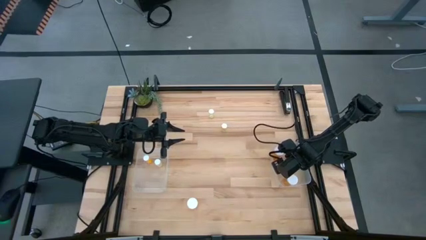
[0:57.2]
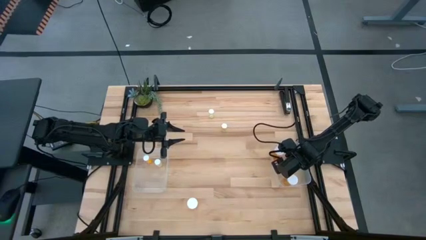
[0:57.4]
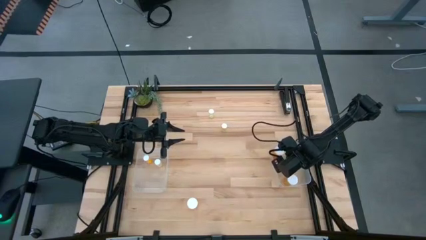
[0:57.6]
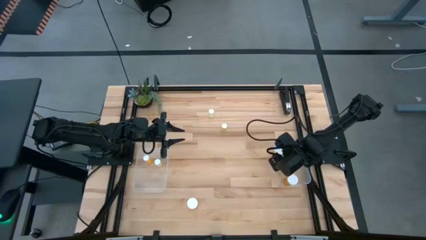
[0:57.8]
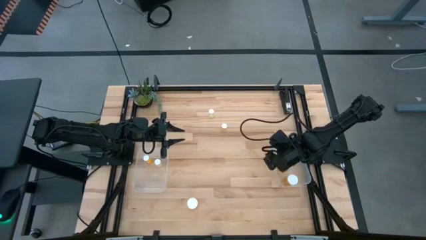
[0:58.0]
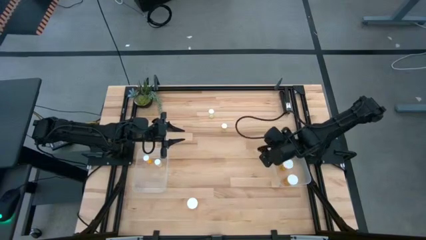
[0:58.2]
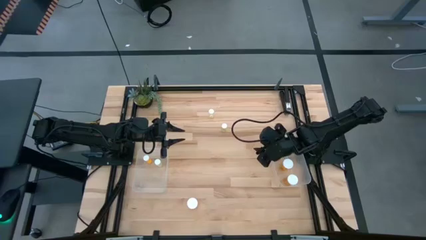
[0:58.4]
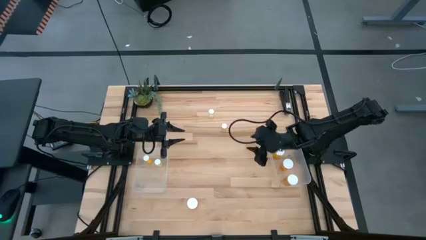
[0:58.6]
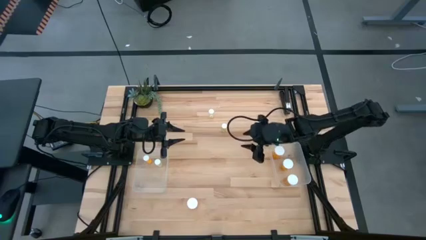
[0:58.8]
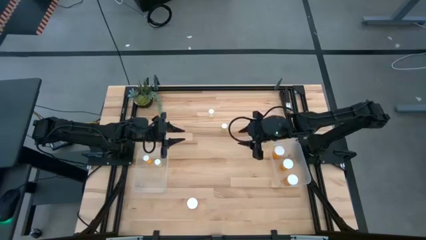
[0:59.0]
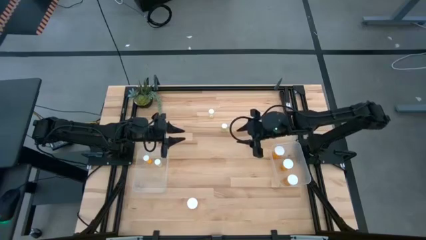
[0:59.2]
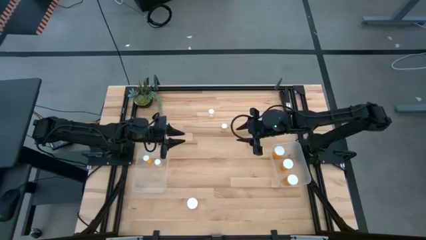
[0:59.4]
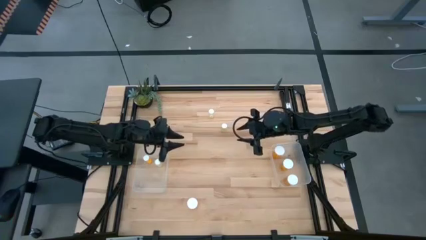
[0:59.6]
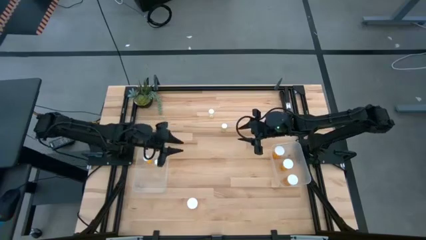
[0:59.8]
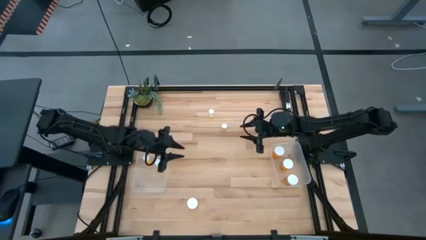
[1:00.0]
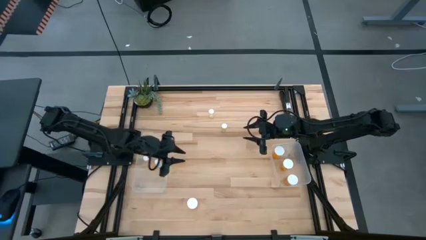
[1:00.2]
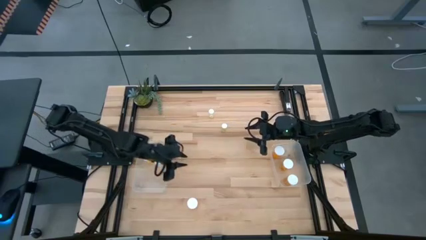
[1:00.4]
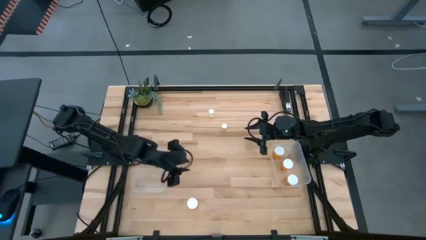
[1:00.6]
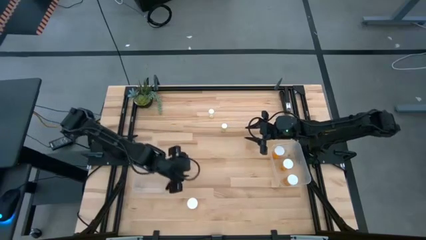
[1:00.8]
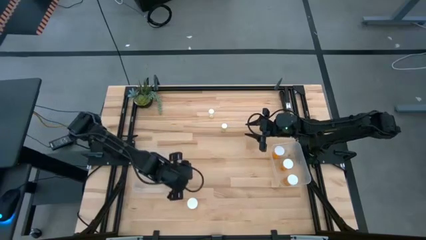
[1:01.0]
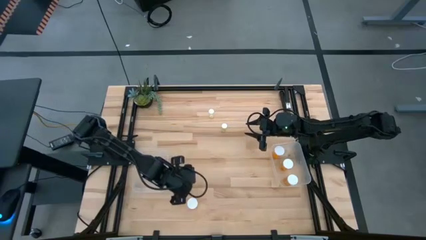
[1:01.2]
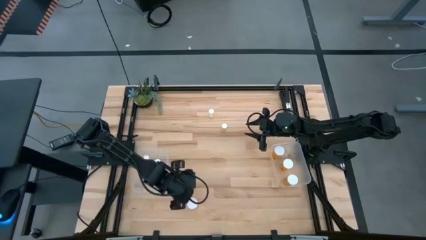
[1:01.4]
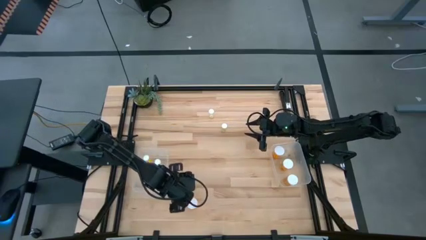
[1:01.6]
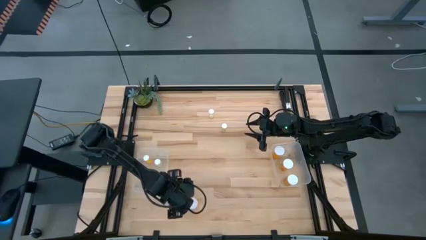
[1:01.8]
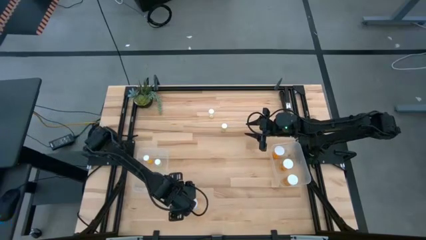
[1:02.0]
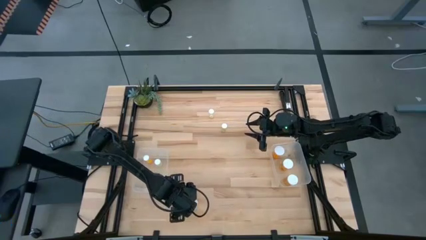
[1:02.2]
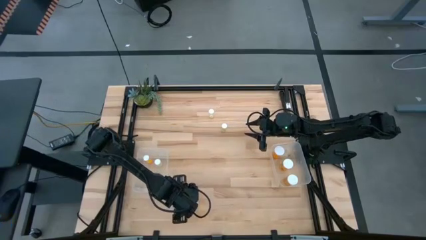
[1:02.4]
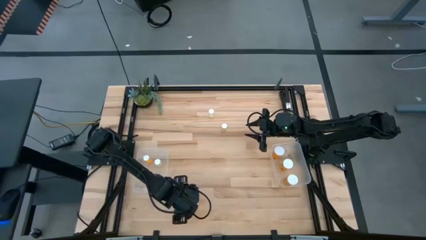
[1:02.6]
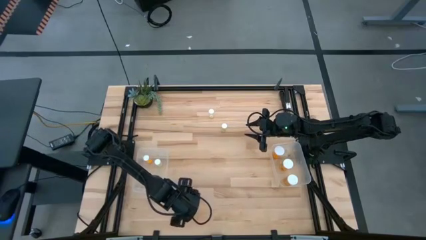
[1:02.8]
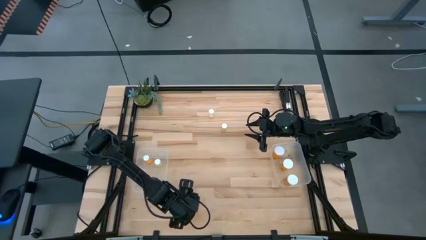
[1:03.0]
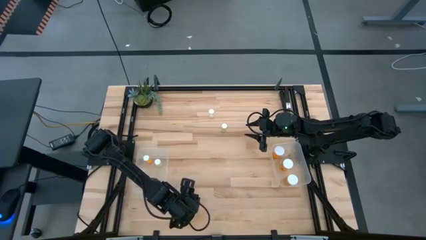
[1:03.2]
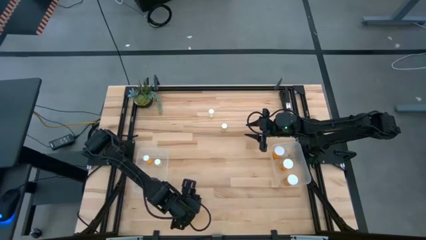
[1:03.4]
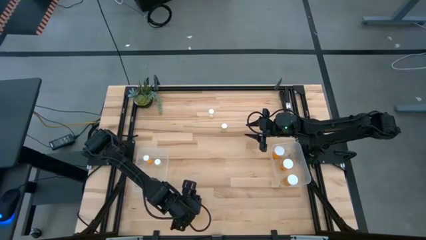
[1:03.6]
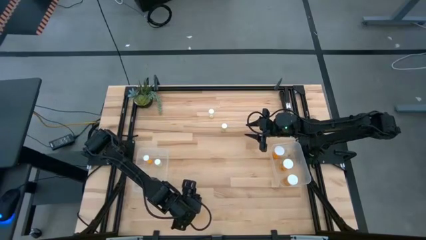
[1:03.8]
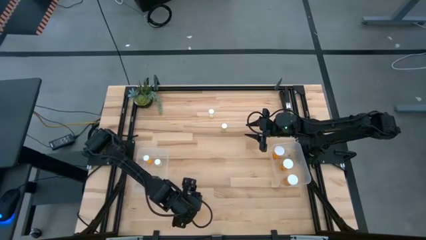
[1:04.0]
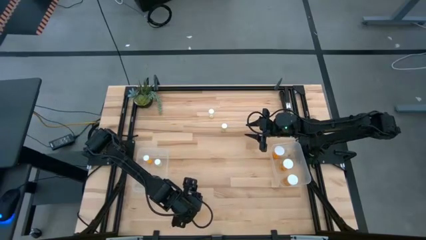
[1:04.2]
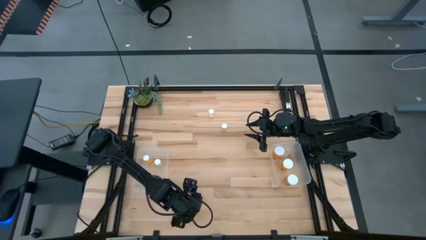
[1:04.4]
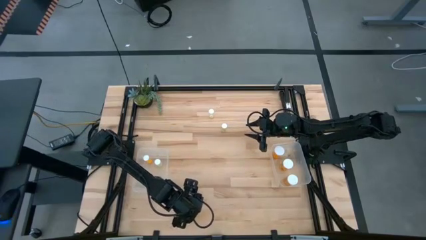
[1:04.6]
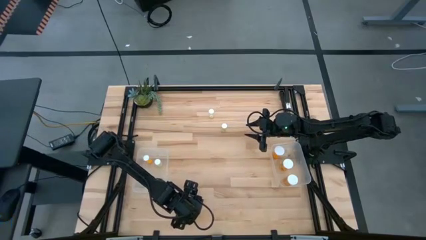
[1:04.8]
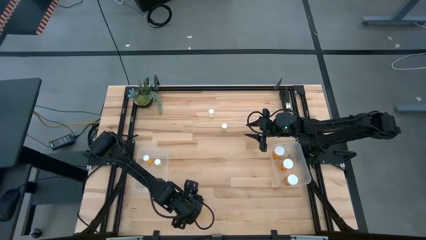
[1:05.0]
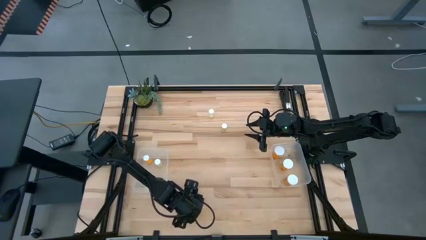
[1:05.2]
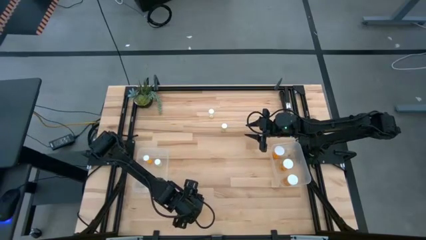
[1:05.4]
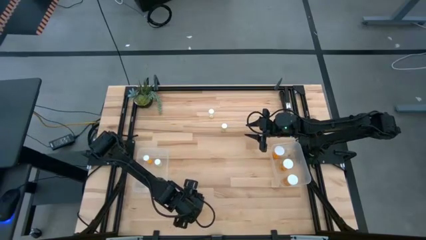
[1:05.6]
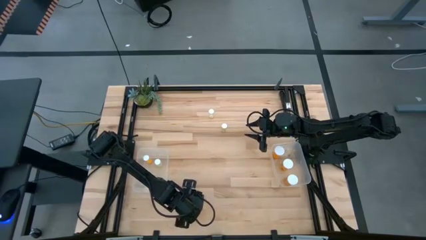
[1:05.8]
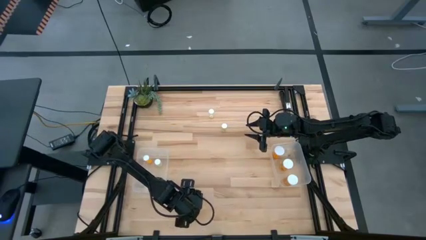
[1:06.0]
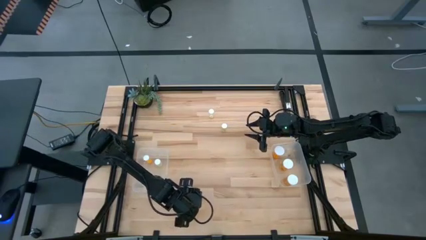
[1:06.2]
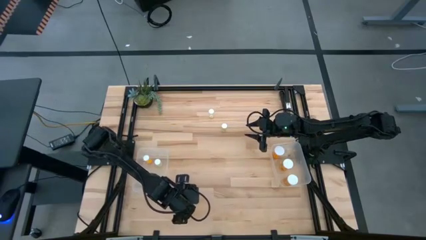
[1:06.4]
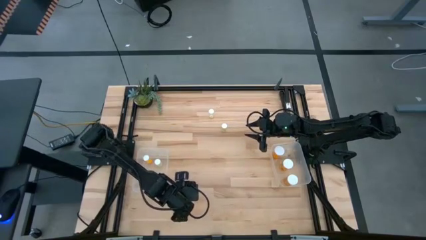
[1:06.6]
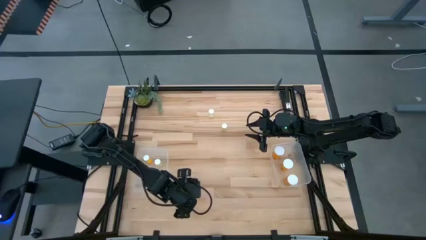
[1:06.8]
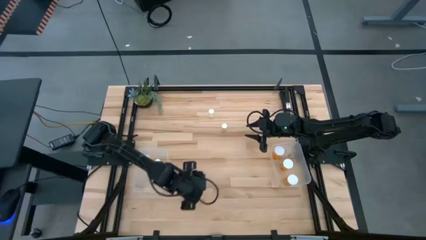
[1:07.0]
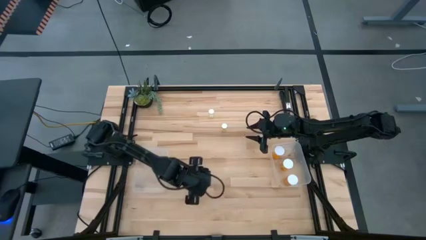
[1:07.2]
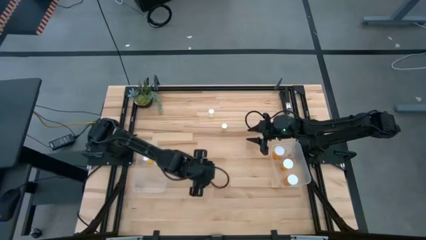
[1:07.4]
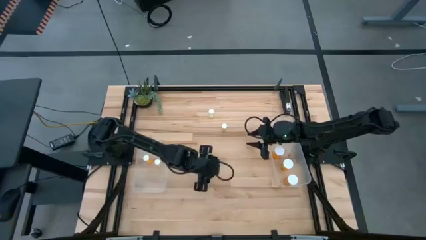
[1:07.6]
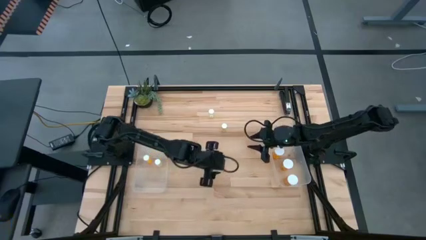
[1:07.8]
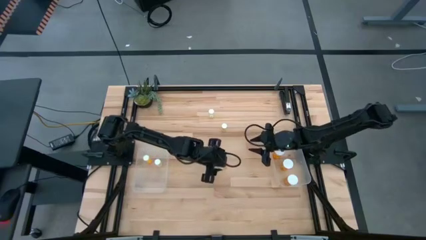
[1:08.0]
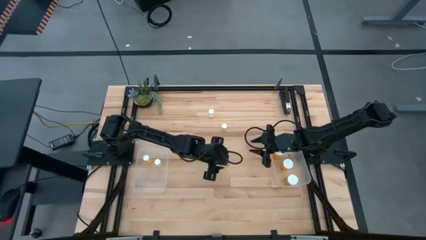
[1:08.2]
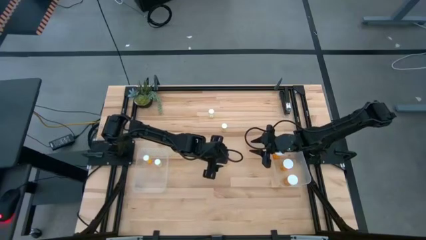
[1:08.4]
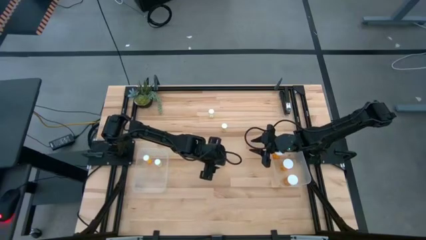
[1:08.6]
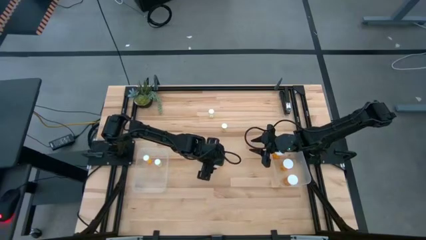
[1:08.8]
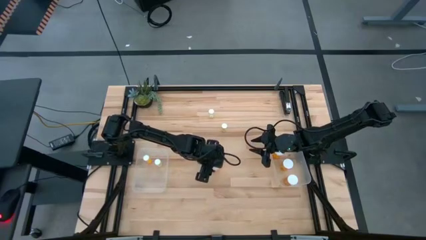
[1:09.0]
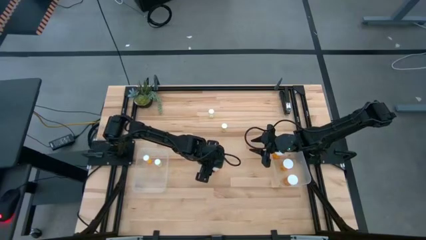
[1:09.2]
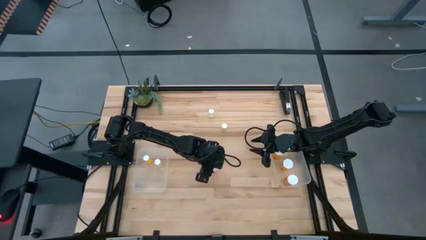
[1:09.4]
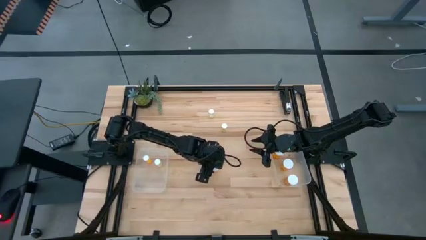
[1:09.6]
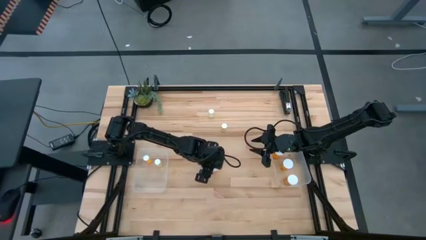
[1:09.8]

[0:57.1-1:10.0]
Task: Pick and place medicine bottles into bin by pill shape (circle, oval)
Put the big yellow pill bottle into the right transparent bin
